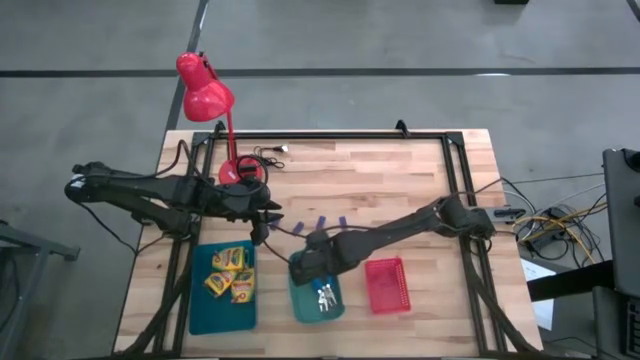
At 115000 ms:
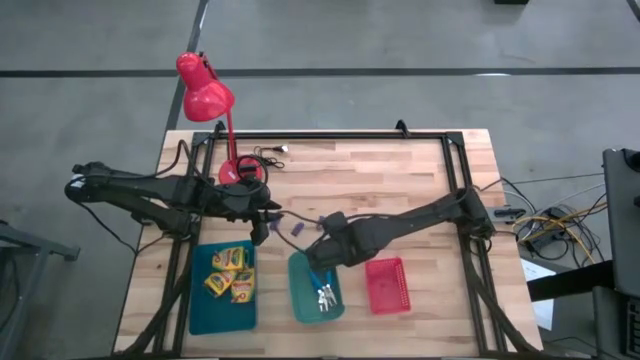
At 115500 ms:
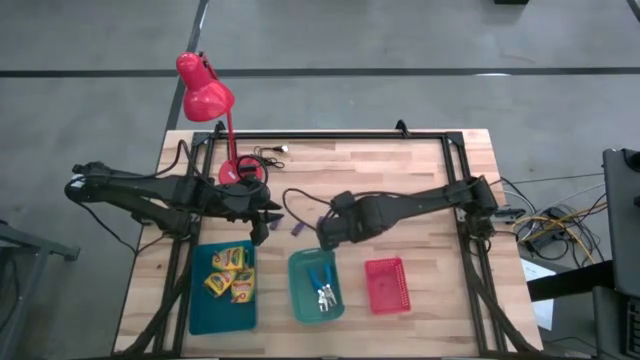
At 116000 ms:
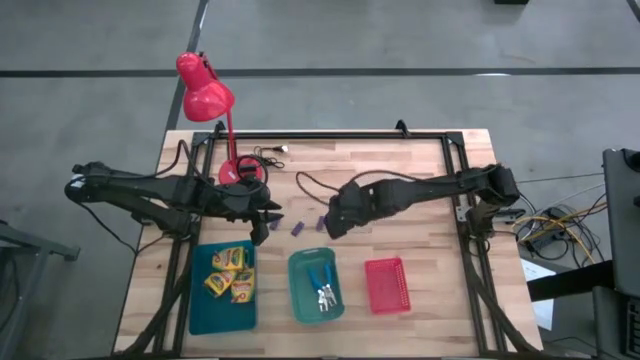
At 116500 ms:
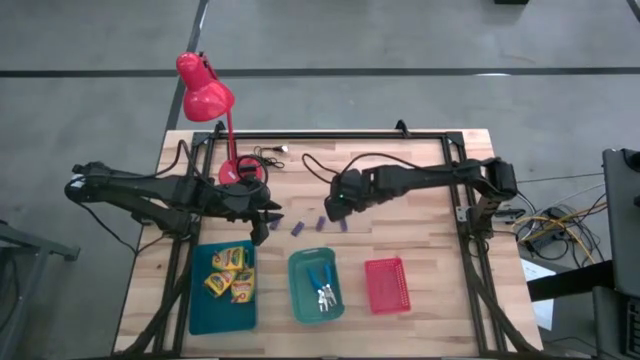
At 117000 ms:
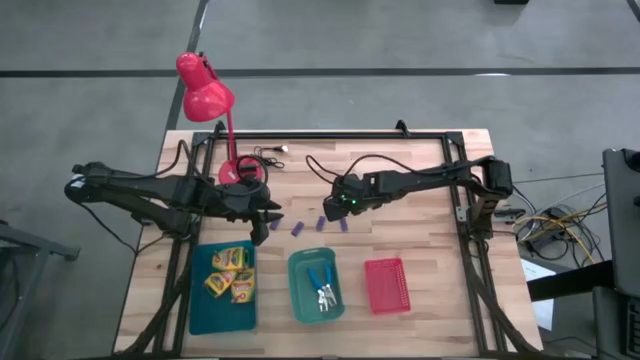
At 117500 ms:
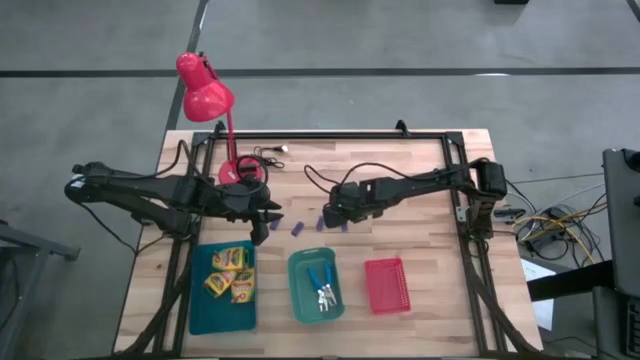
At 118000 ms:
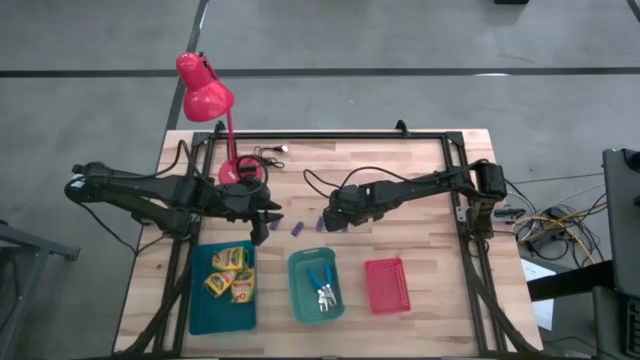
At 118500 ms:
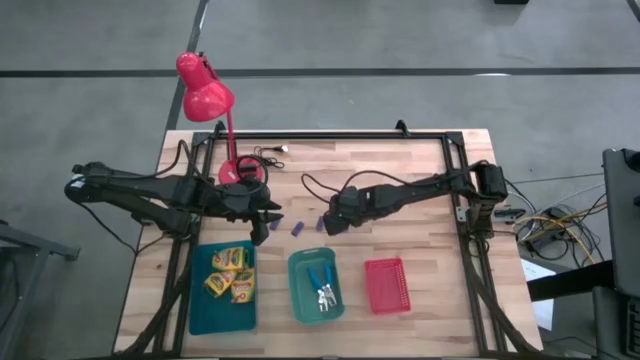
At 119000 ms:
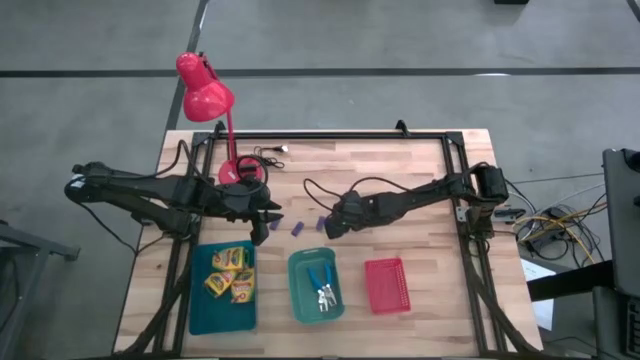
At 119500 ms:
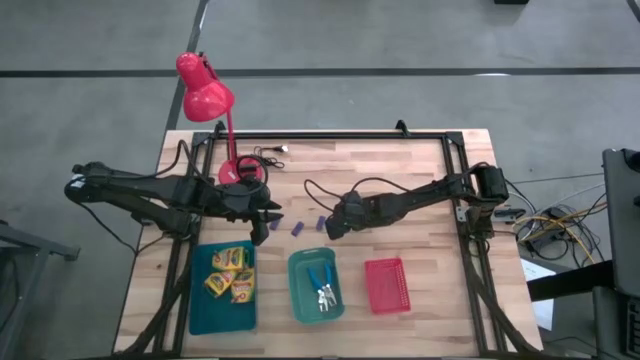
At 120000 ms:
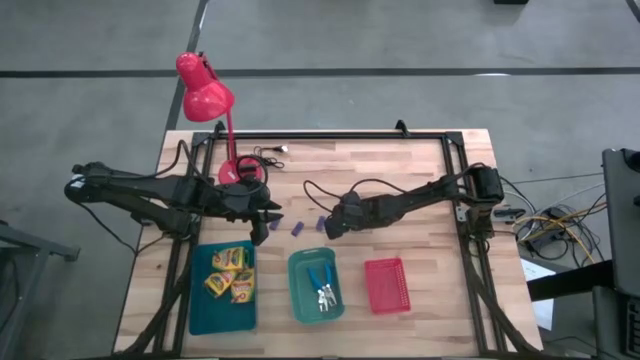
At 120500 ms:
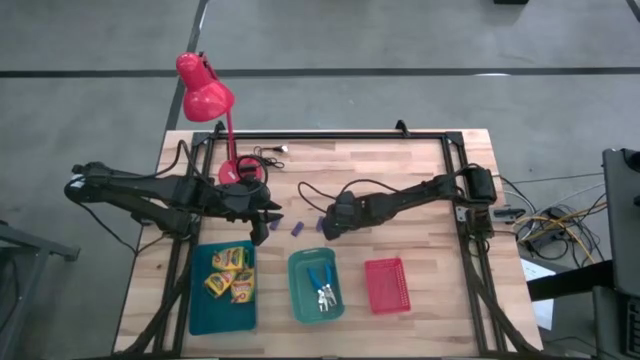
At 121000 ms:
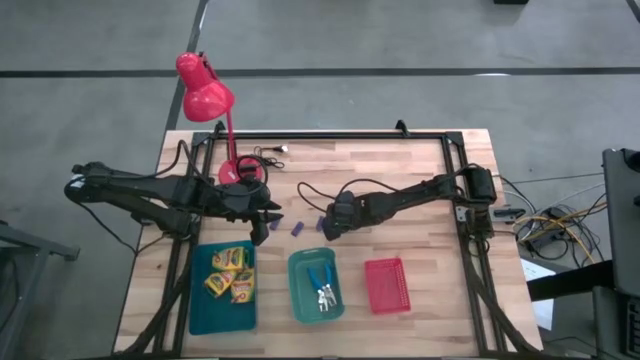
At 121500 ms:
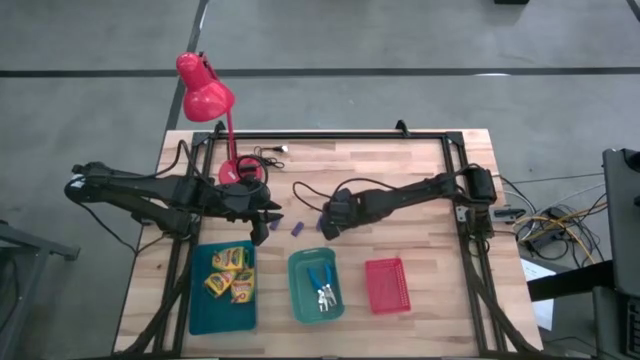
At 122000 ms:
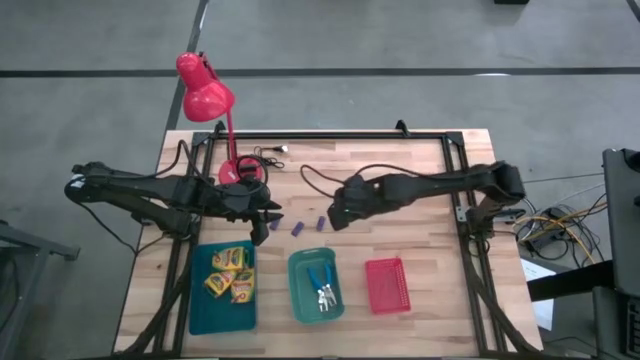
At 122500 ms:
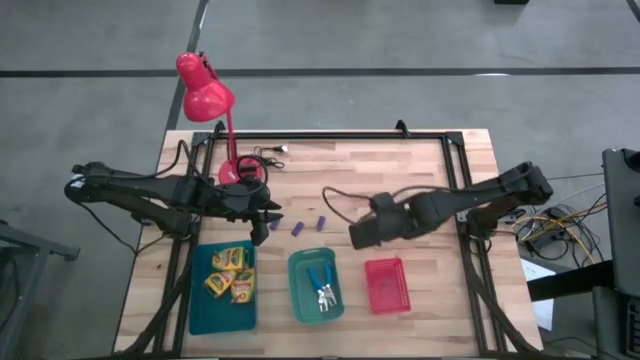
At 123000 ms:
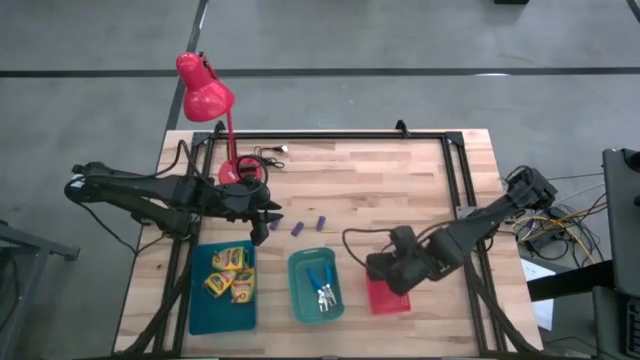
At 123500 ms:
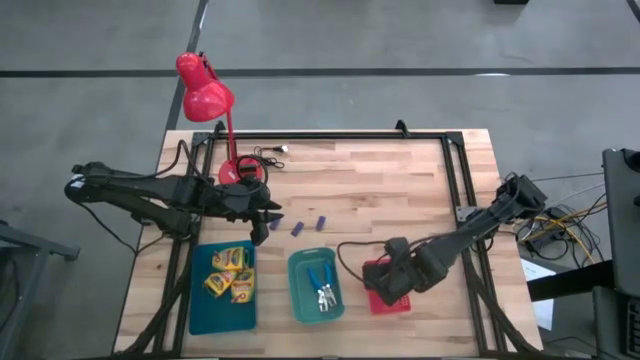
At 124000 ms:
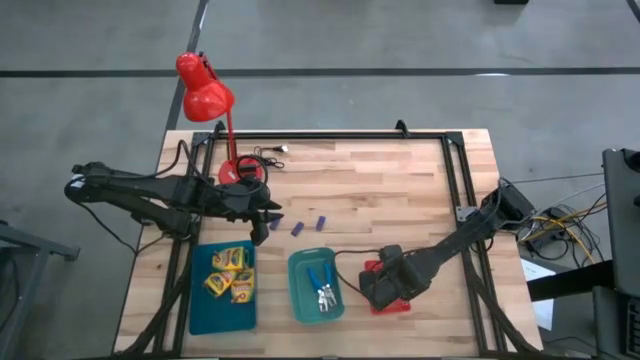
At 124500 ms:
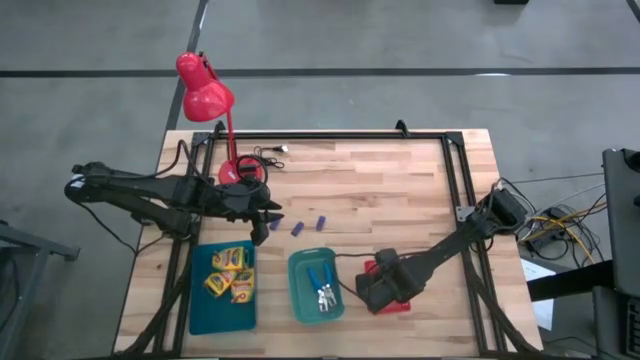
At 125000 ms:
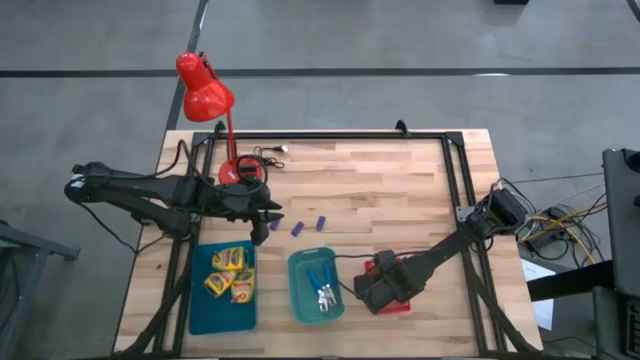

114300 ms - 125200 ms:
Task: Pick & Place School Supplies
Put the purple eraser into the red bin

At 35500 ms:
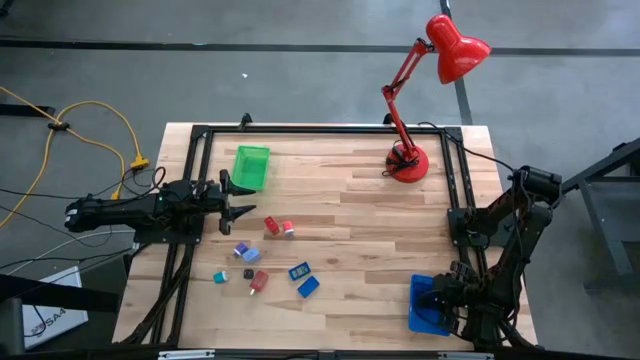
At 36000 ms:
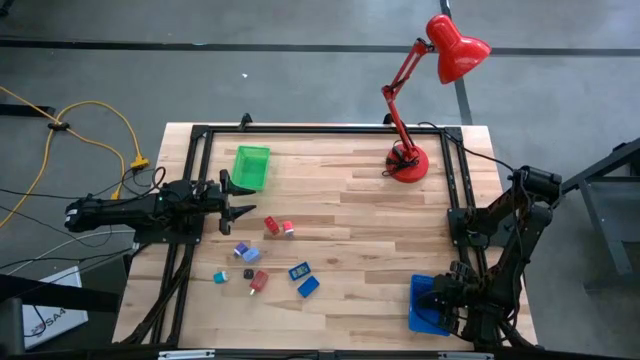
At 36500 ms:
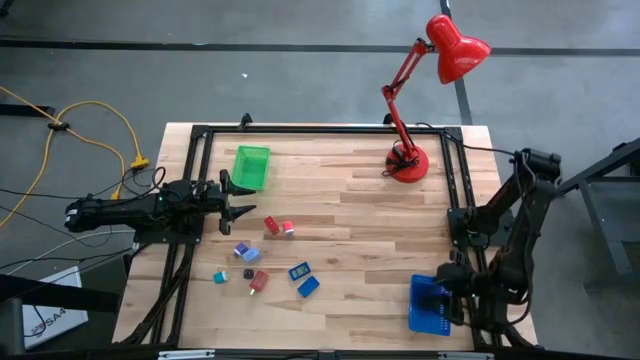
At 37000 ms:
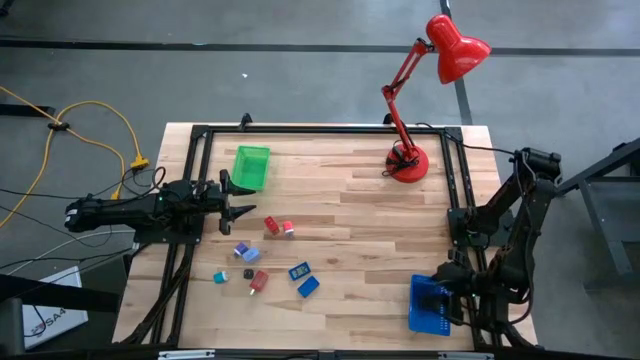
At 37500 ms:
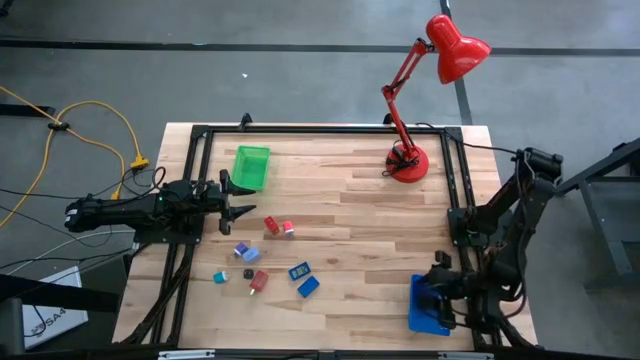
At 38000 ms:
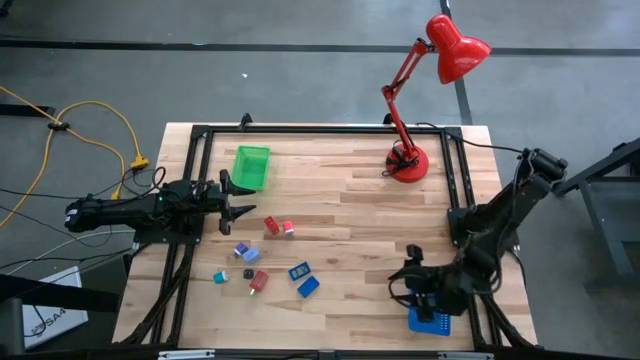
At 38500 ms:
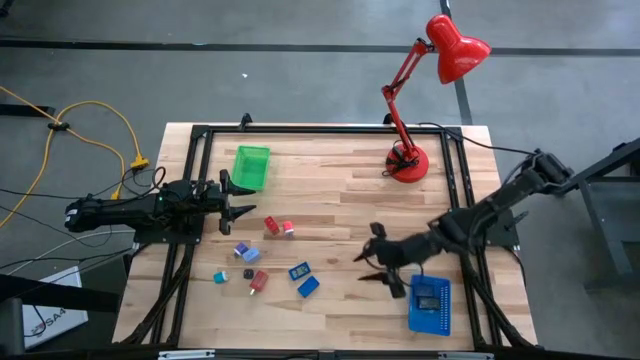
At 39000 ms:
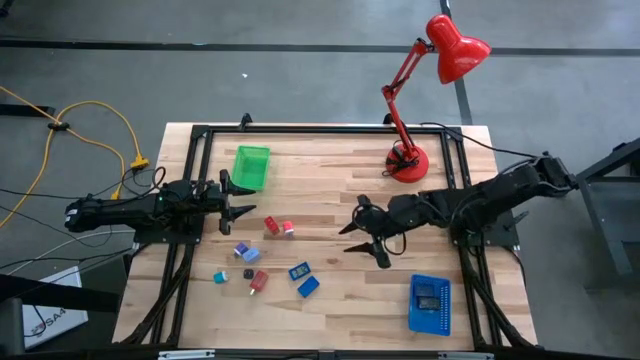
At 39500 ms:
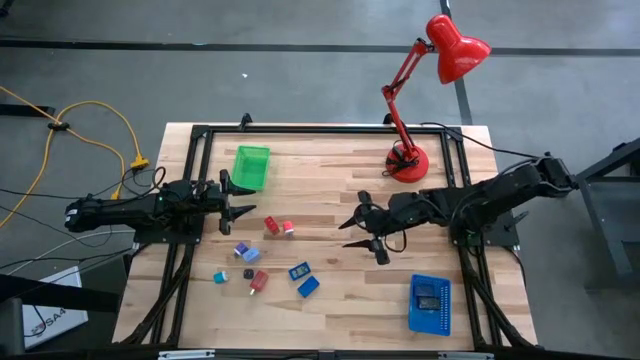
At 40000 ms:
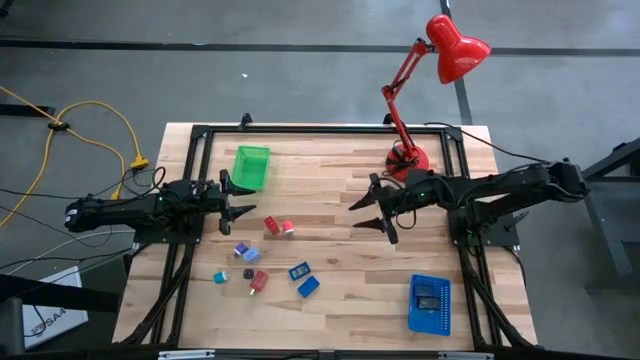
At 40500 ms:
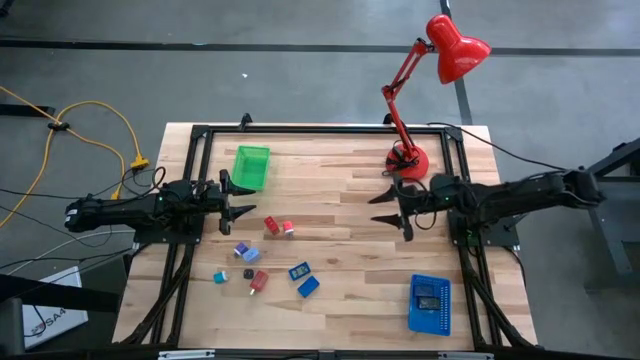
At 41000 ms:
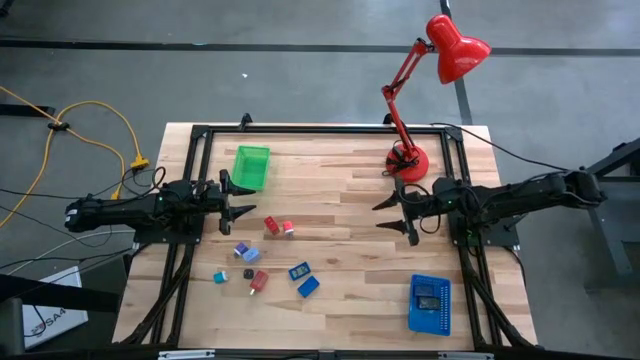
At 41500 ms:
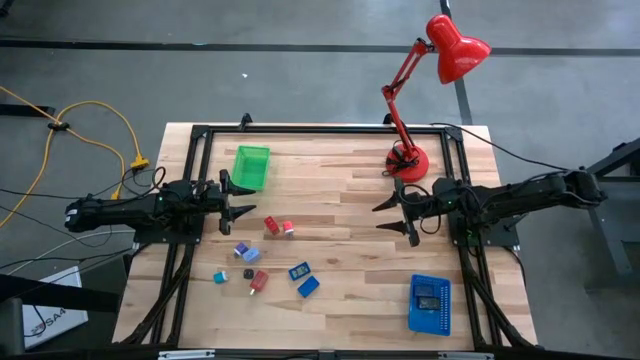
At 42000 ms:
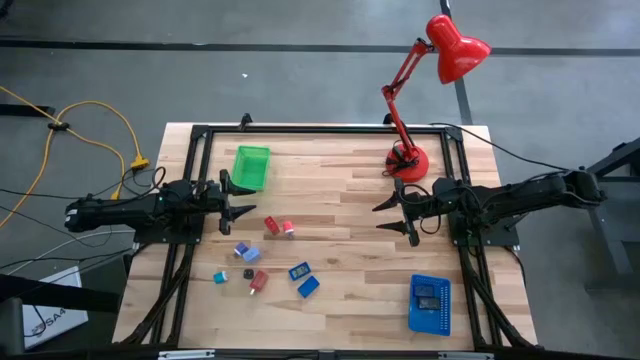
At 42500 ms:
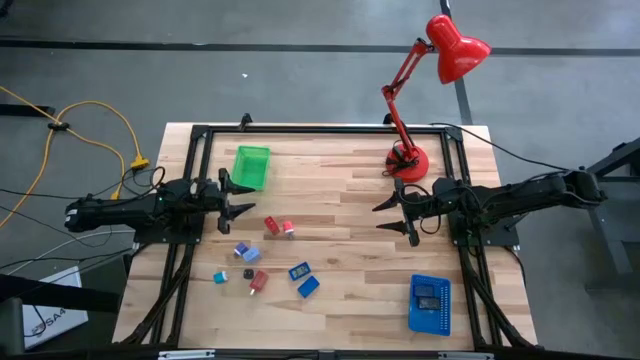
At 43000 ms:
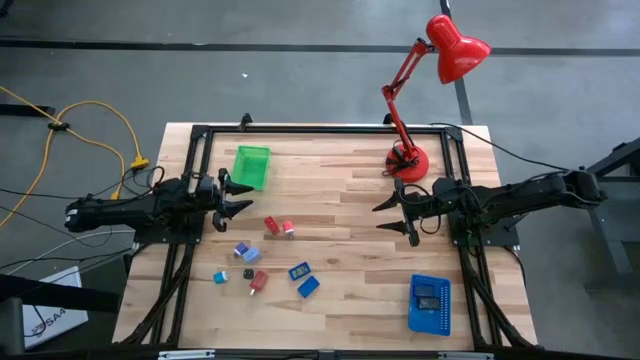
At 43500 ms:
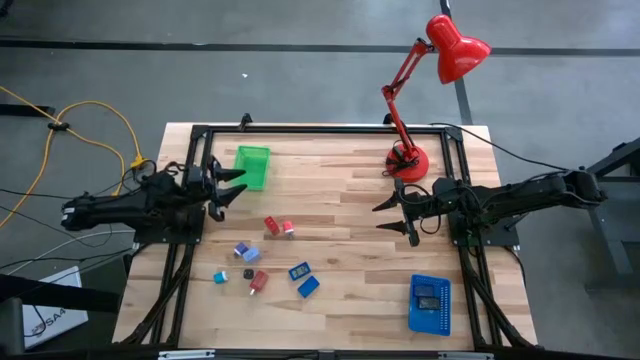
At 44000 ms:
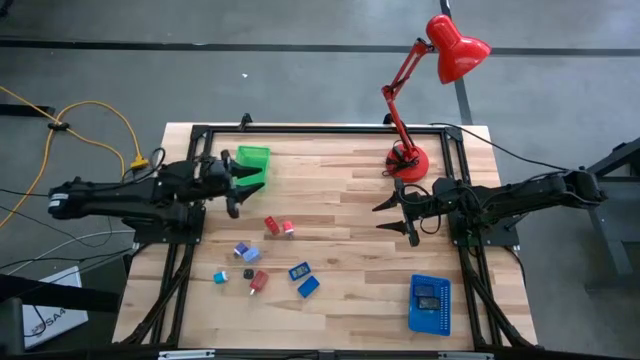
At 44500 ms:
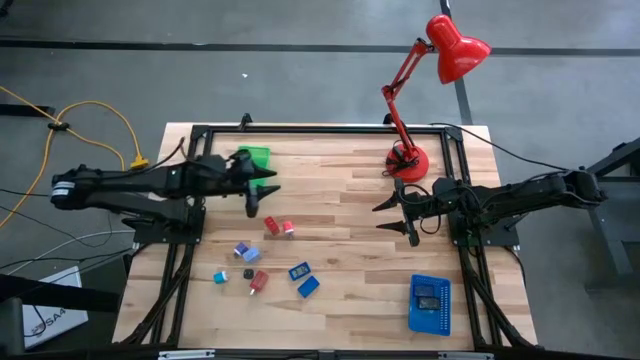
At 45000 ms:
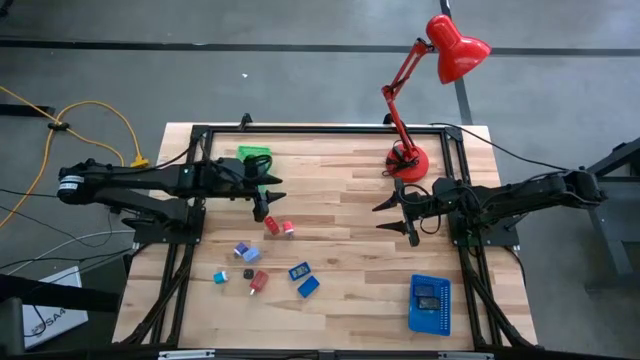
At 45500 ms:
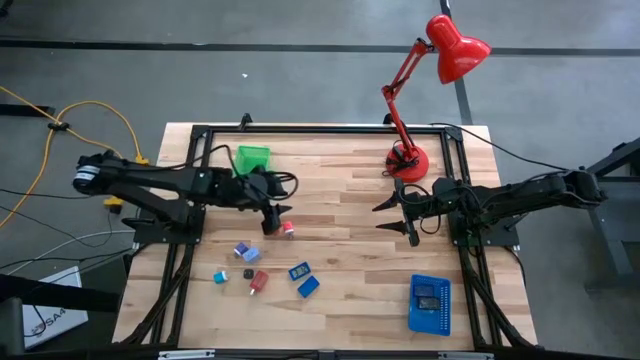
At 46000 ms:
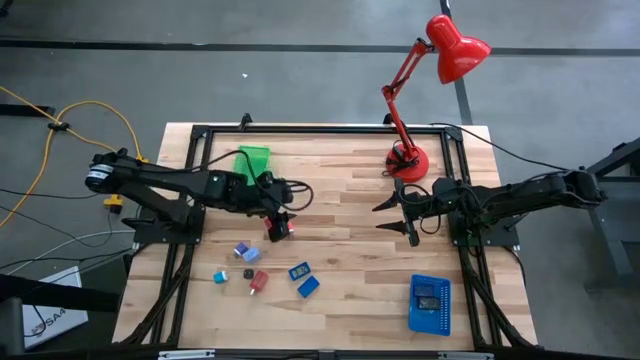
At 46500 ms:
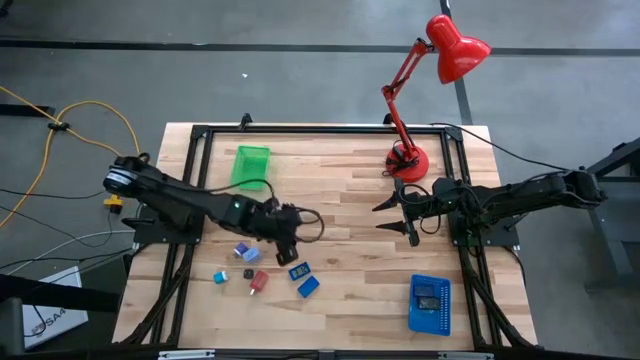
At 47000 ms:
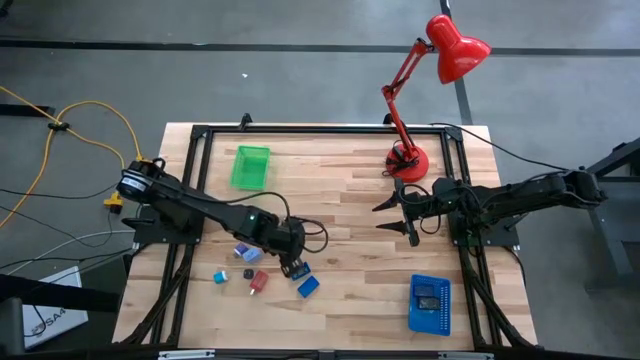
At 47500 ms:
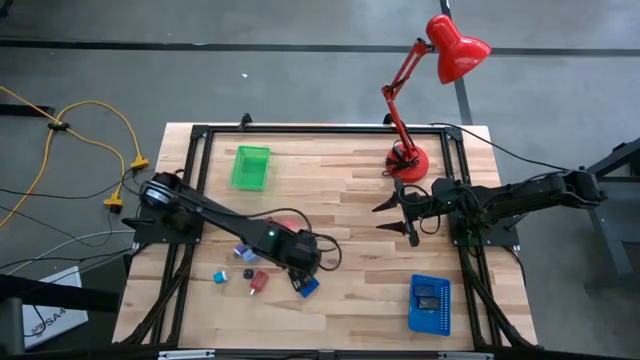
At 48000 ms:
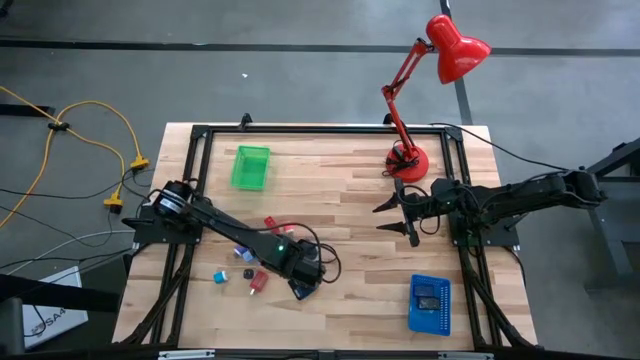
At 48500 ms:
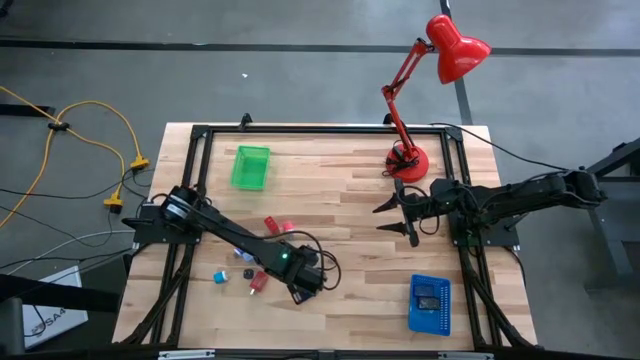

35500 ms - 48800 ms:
Task: Pick & Place Office items
Put the top blue digital timer into the blue bin
